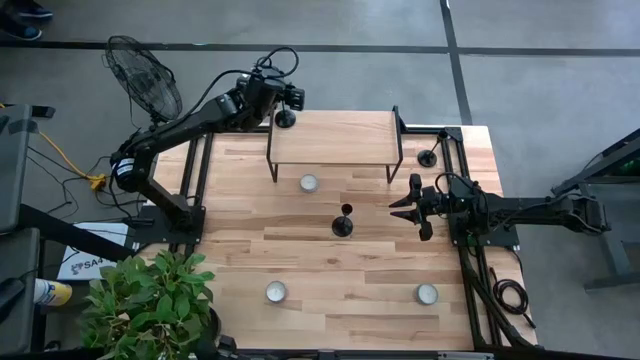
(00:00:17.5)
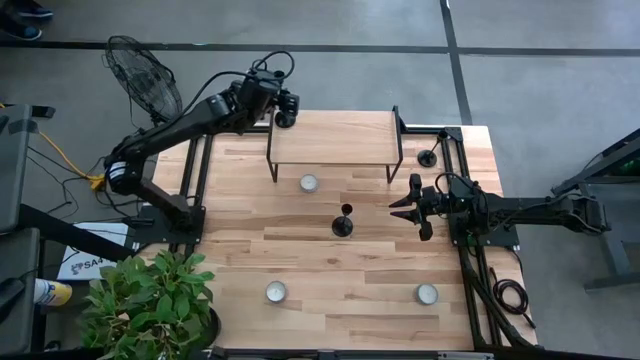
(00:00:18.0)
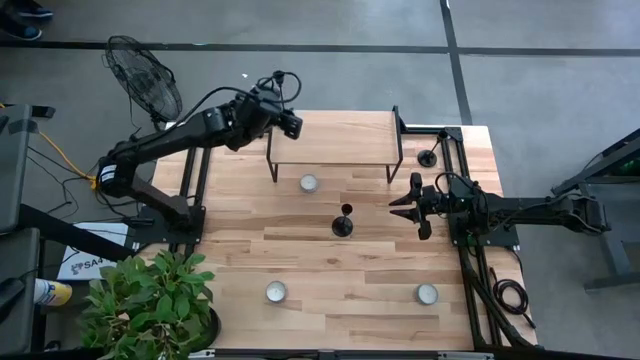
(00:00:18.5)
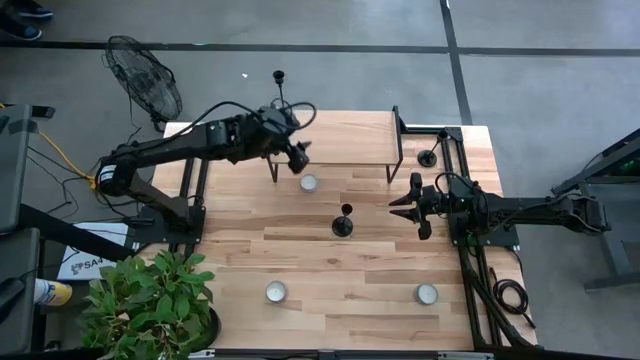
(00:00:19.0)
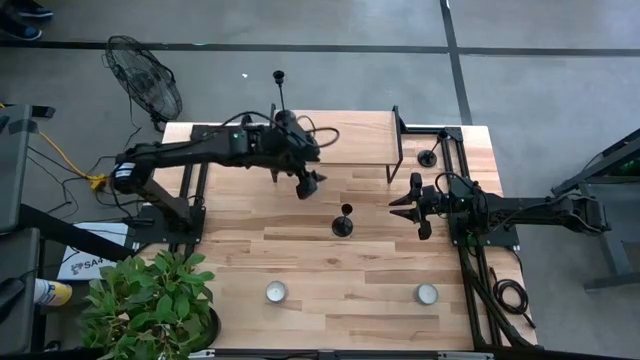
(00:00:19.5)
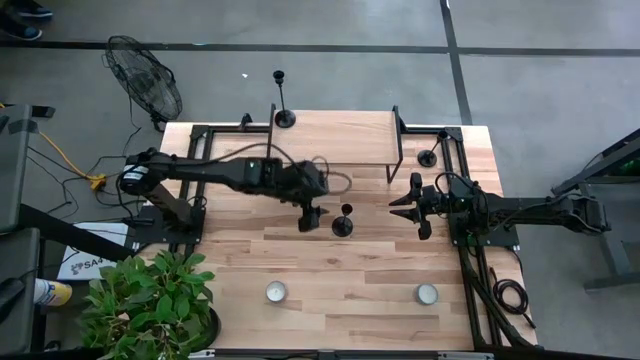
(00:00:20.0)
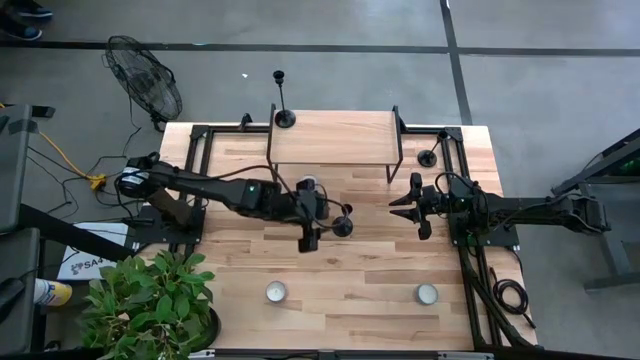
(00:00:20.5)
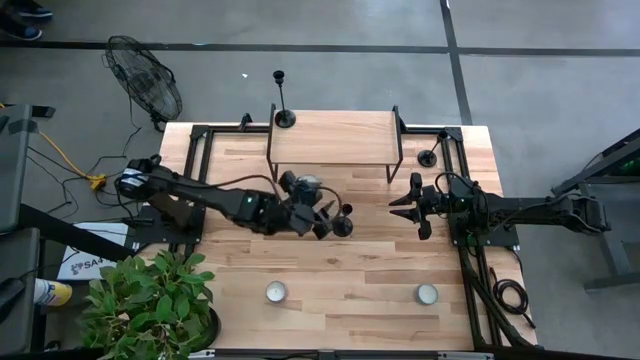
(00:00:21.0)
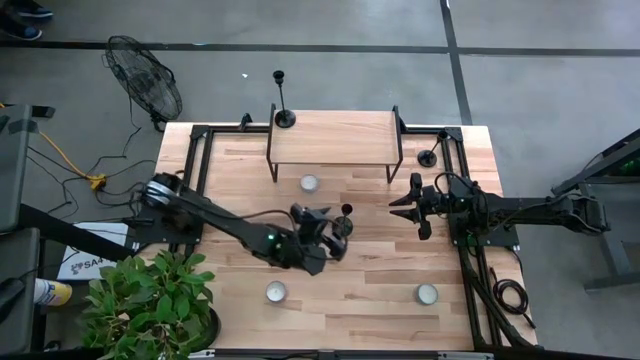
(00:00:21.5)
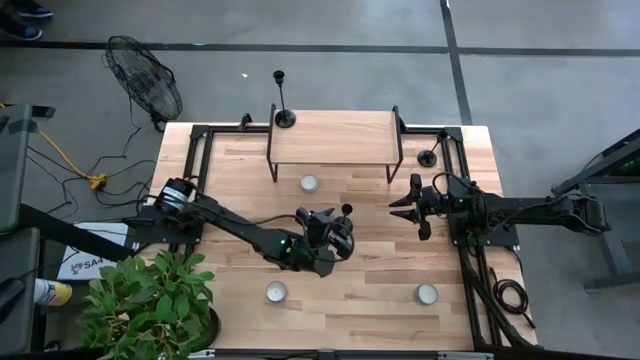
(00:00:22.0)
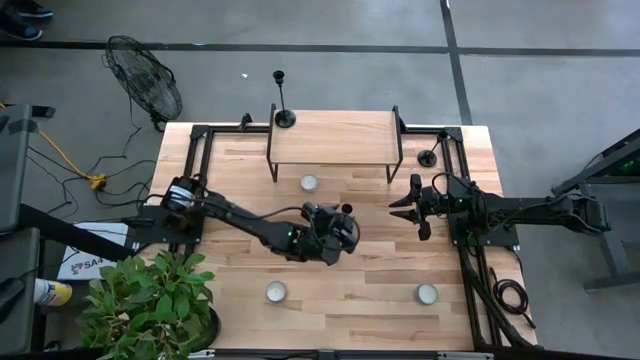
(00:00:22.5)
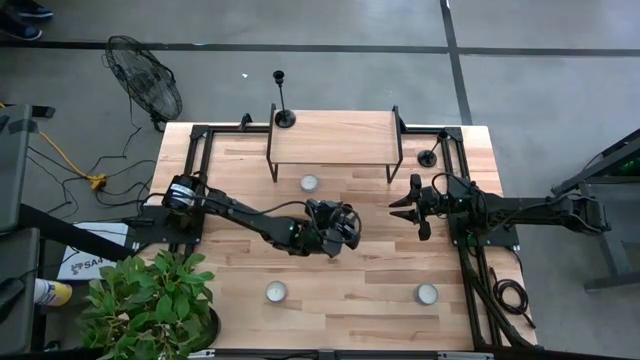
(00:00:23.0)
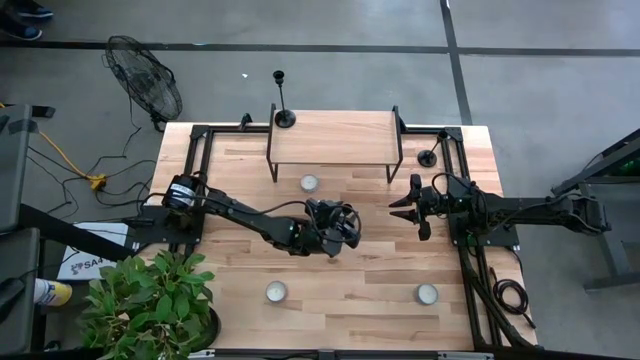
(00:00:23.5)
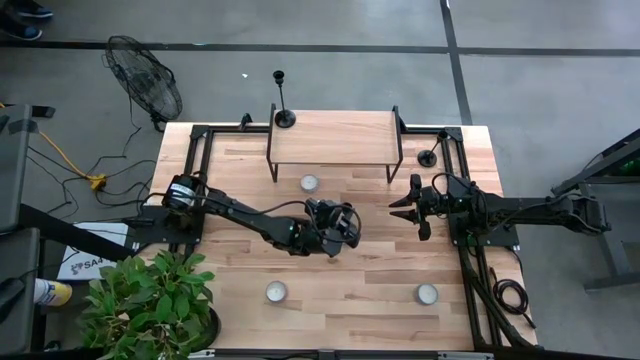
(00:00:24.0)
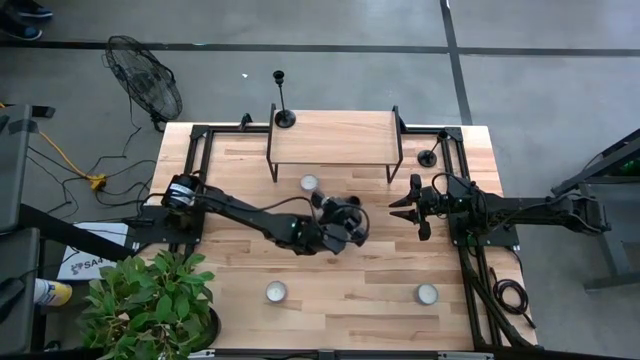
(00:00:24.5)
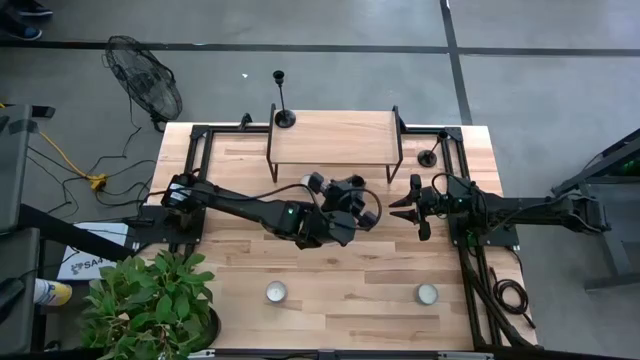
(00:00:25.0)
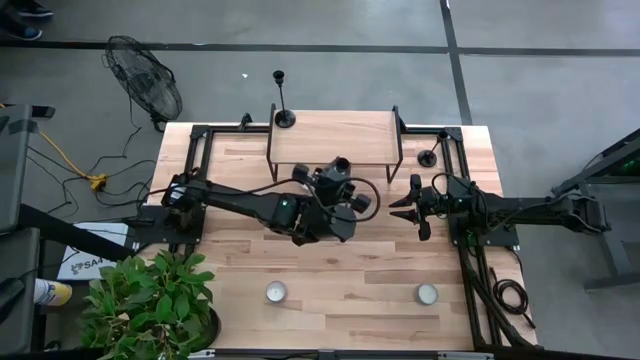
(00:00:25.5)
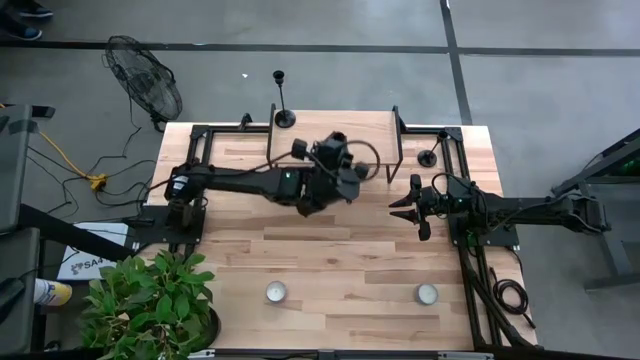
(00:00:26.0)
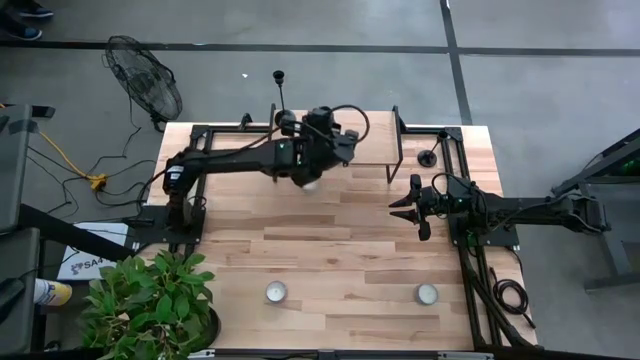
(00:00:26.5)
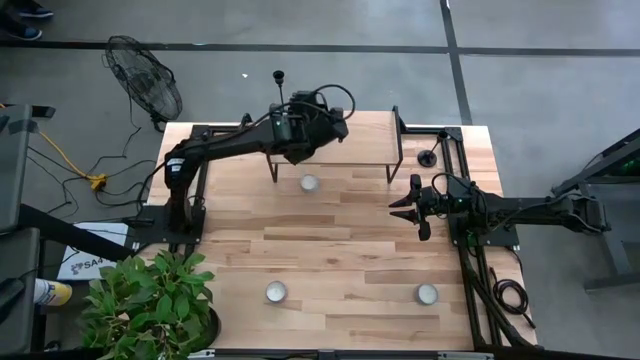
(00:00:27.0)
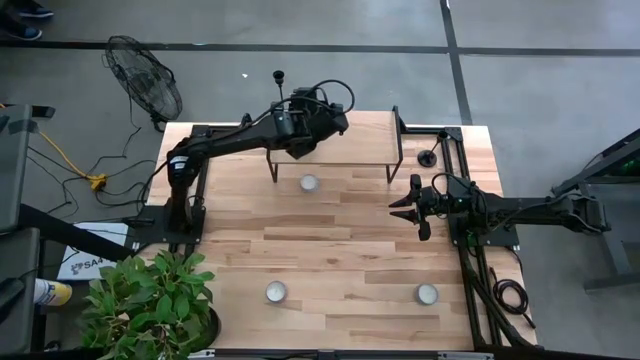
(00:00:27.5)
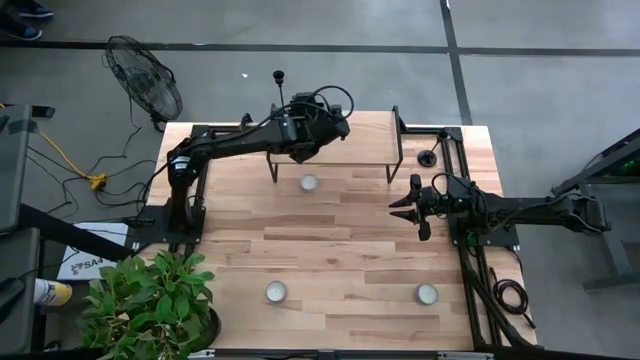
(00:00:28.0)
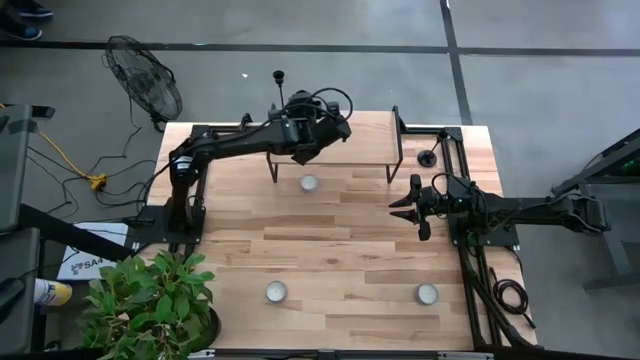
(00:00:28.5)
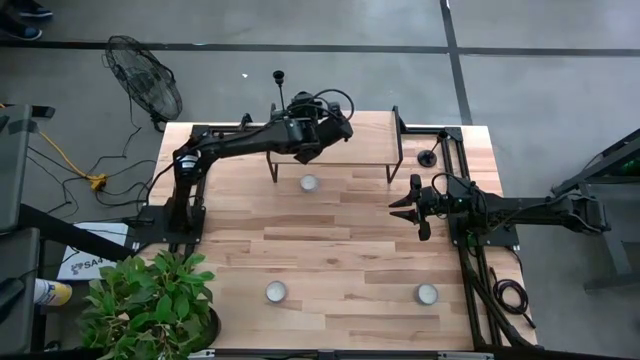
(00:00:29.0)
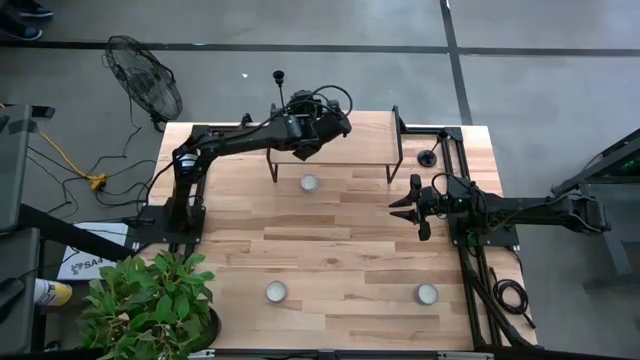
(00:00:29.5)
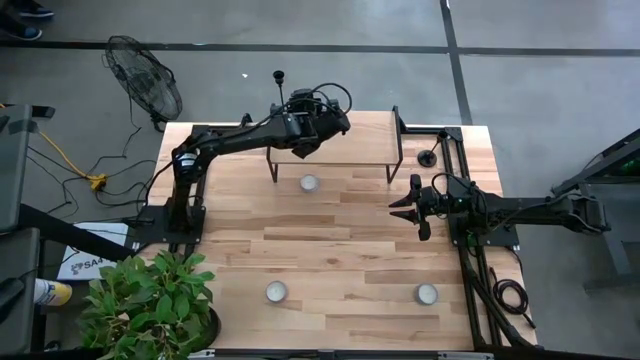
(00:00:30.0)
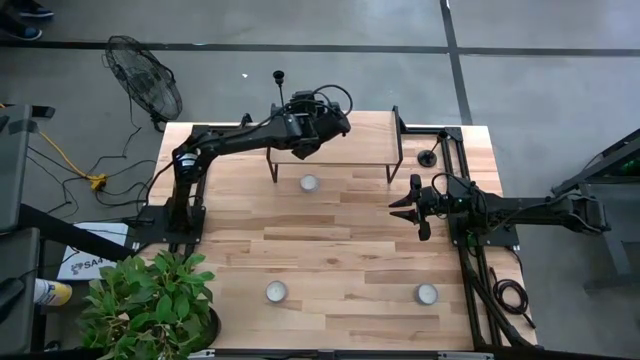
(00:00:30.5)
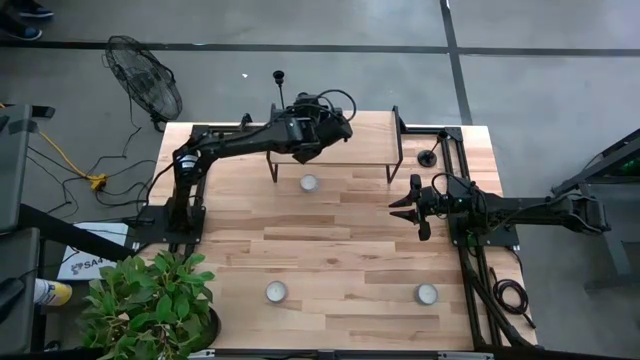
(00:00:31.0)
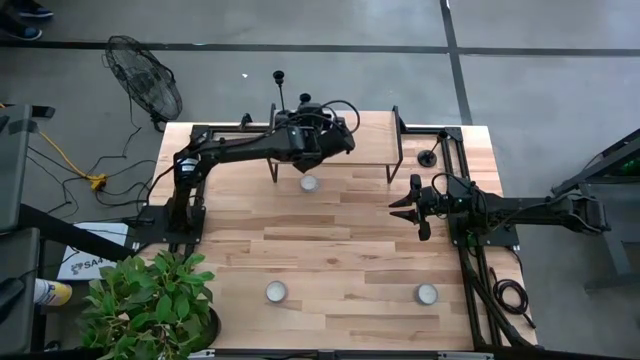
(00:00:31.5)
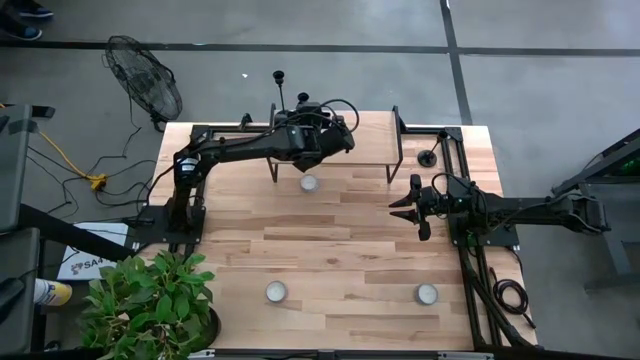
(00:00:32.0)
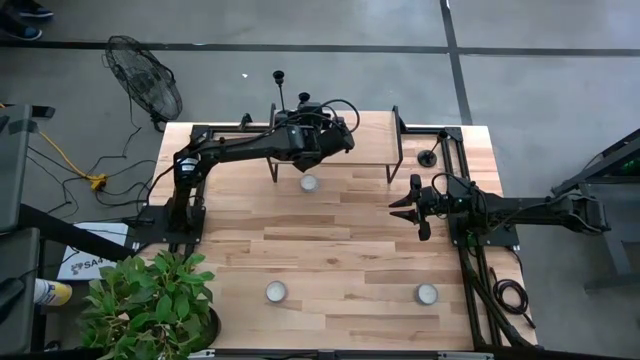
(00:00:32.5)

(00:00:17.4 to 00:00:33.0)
Task: Pick & Place candle stick holders
Put the bottom black candle holder on the shelf

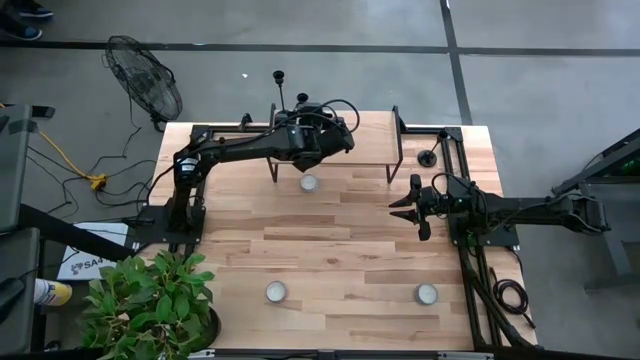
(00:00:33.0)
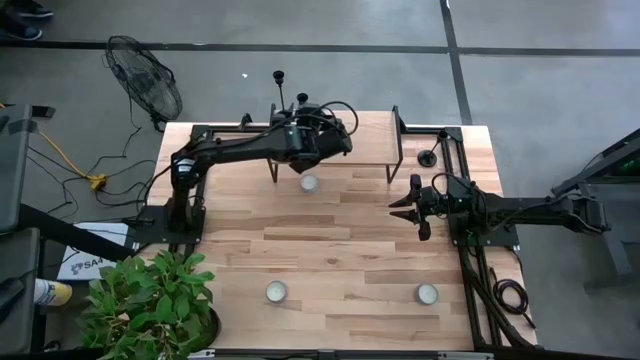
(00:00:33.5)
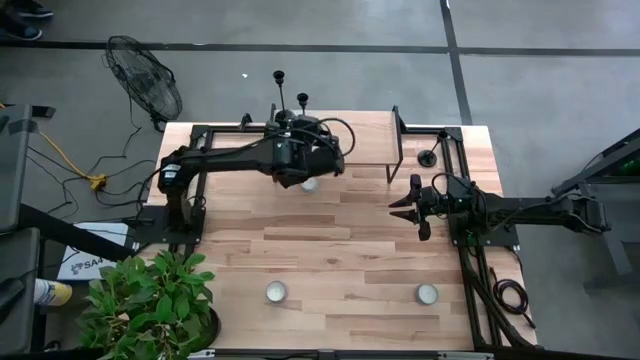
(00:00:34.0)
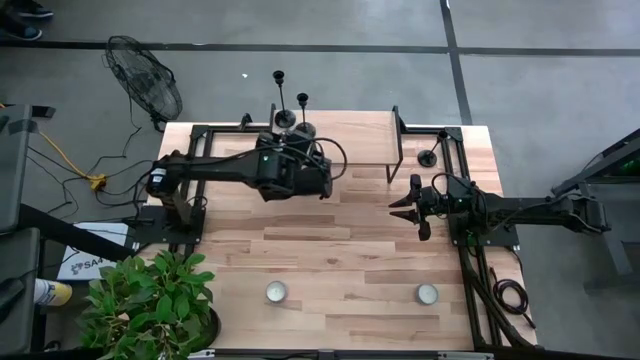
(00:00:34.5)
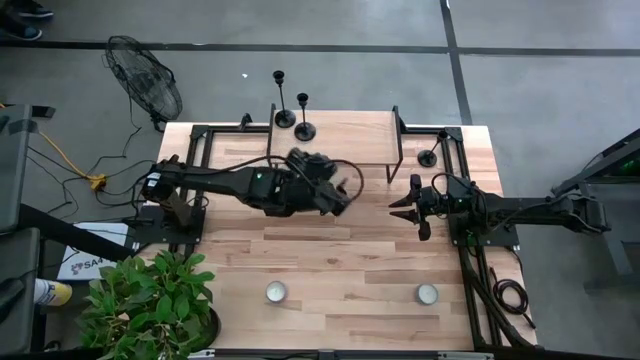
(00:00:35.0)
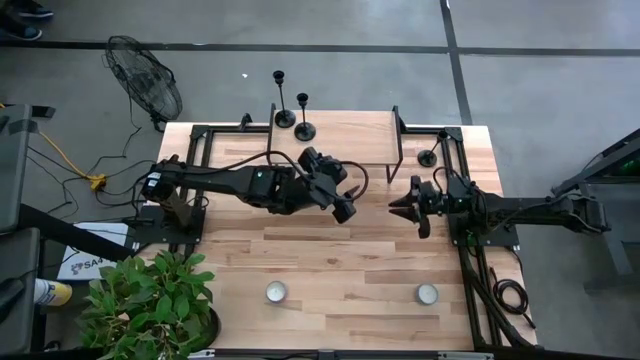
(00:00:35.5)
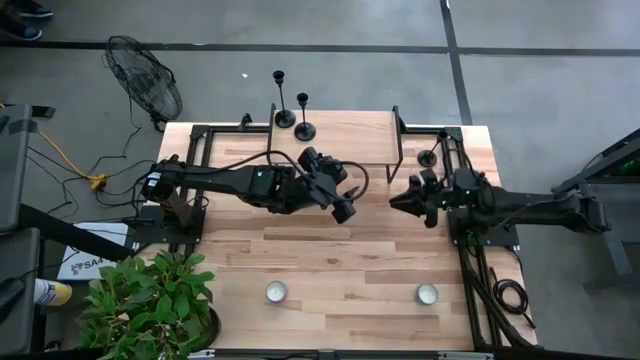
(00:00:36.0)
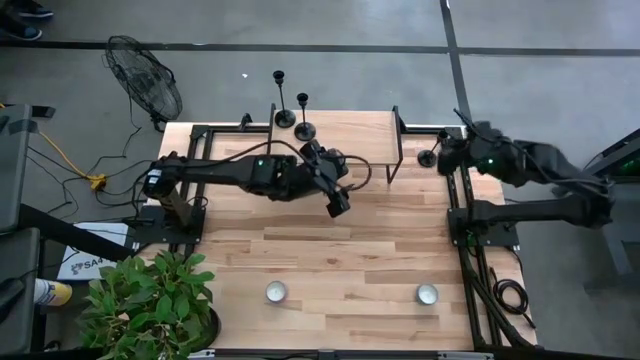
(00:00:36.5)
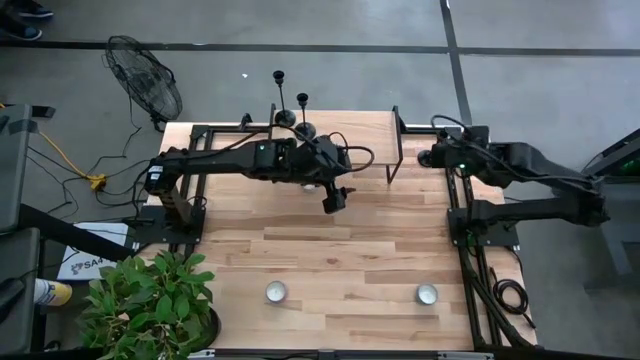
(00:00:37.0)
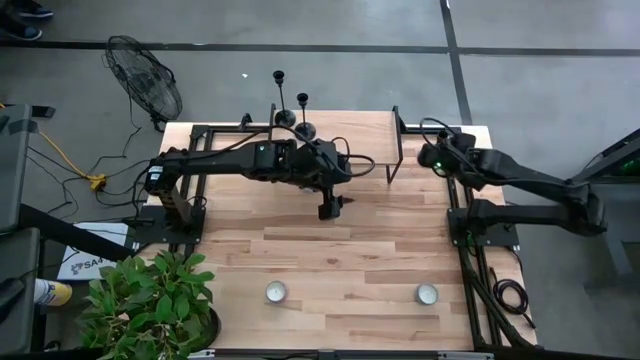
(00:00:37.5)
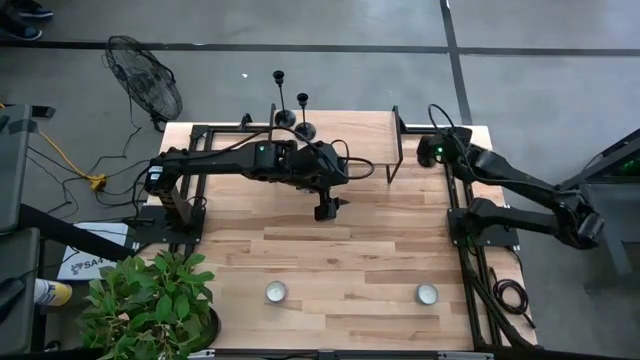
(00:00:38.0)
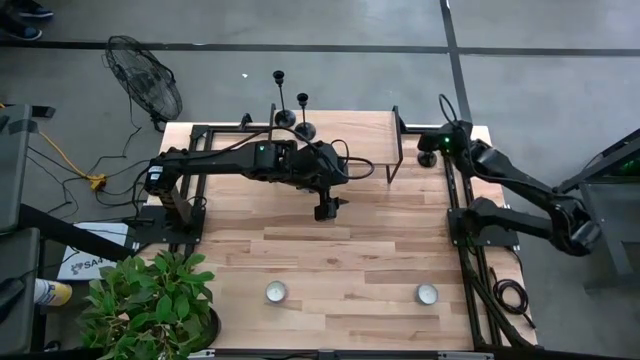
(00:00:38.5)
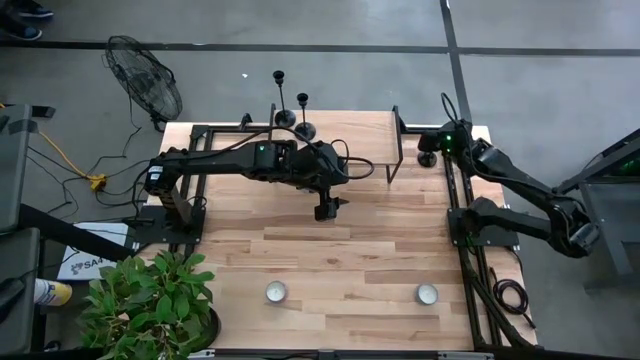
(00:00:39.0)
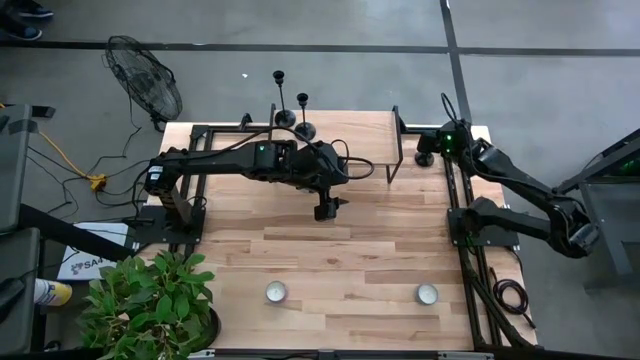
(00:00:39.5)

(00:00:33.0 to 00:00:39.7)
Put the black candle holder on the shelf
